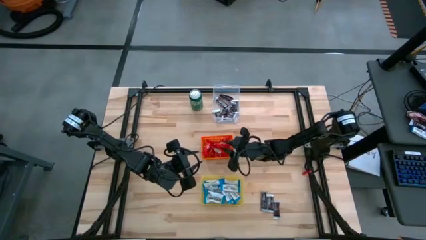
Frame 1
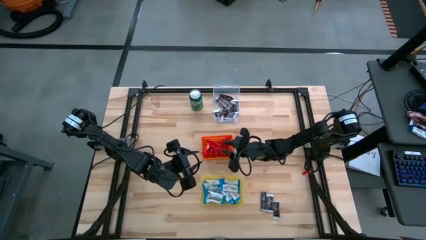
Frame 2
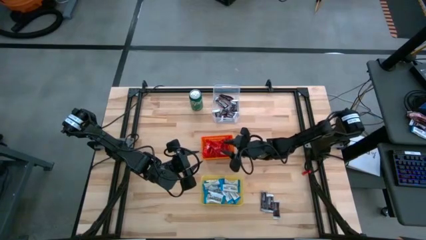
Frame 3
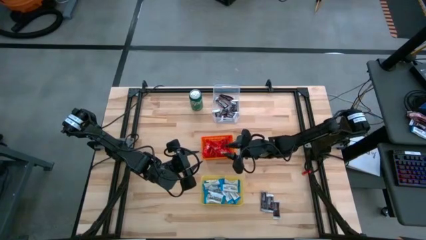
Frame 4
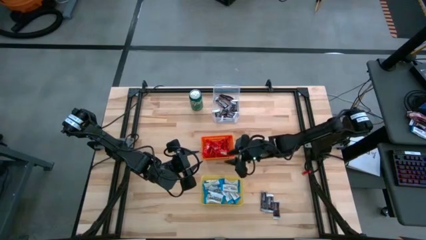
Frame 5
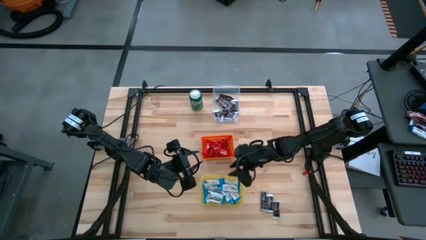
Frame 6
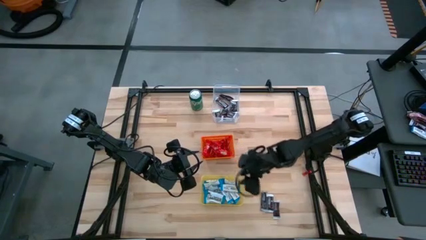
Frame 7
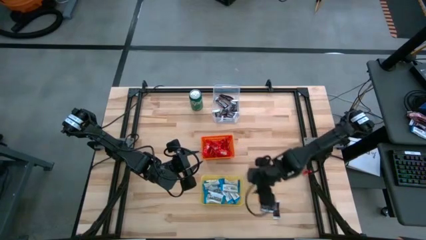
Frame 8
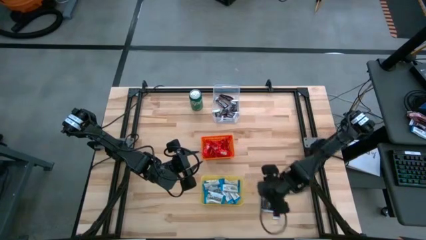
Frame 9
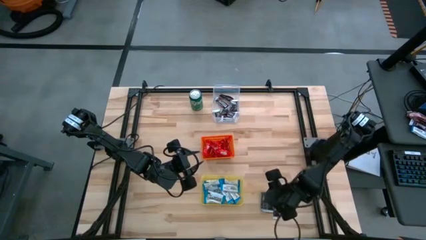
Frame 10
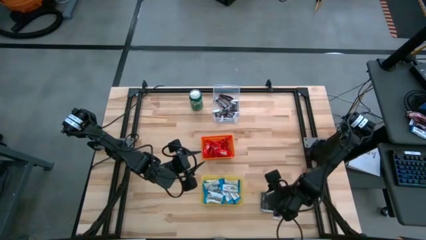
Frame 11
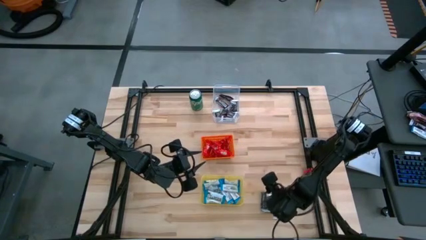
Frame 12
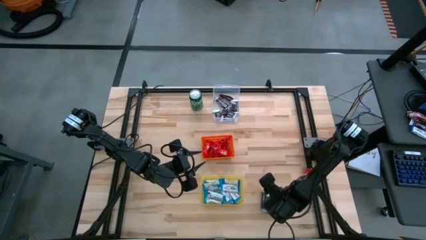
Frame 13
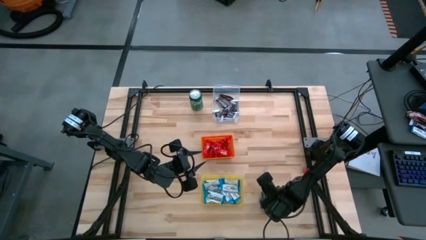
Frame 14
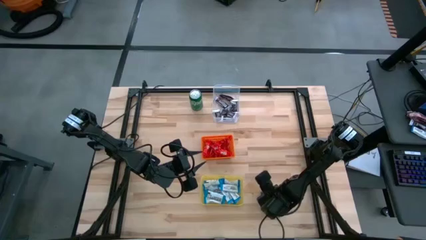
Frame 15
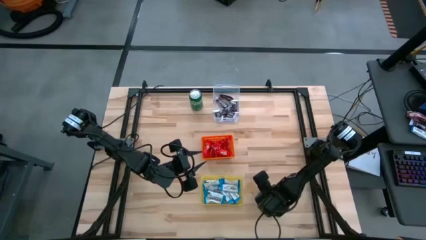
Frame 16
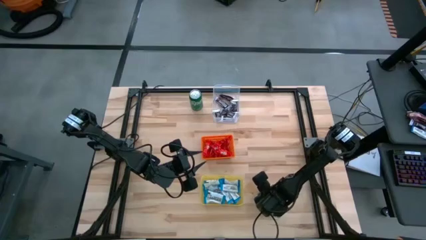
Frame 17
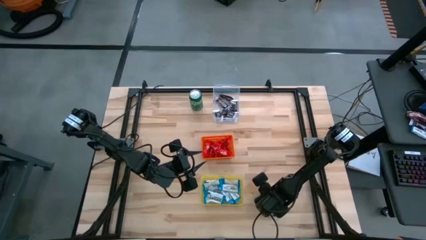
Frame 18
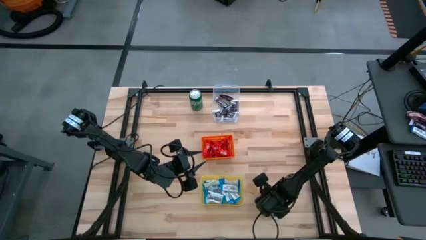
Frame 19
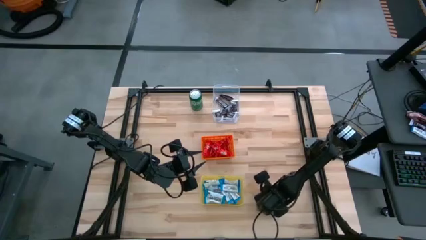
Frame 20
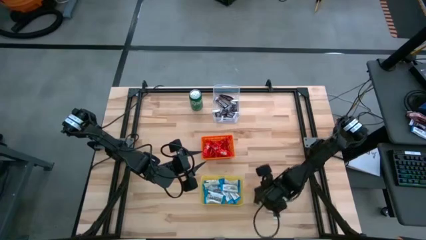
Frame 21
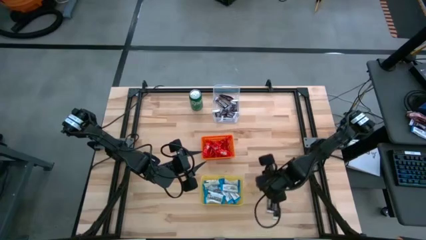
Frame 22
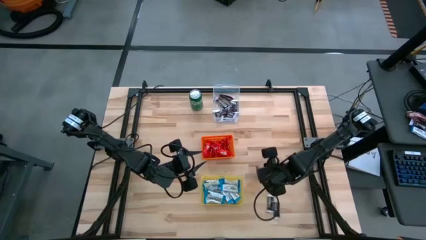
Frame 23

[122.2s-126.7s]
Task: Sort candy
Put the black candy into the transparent bin

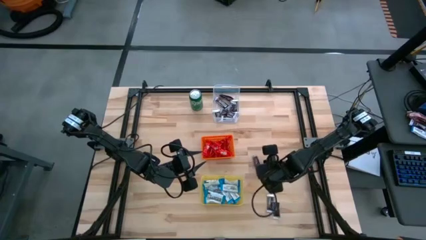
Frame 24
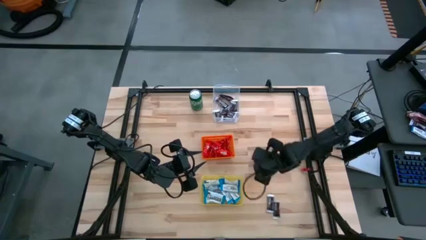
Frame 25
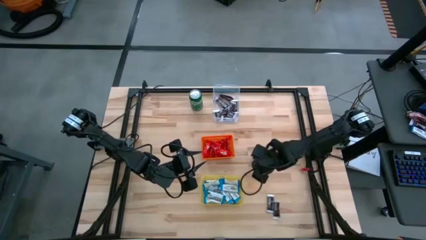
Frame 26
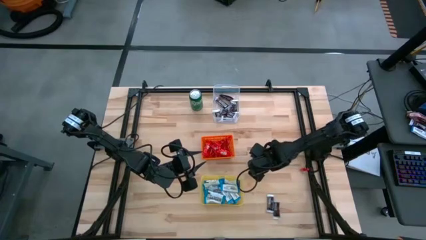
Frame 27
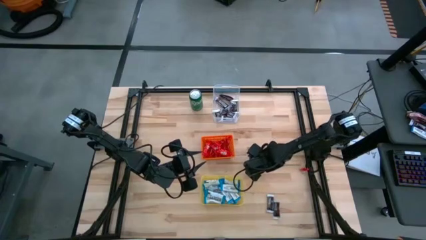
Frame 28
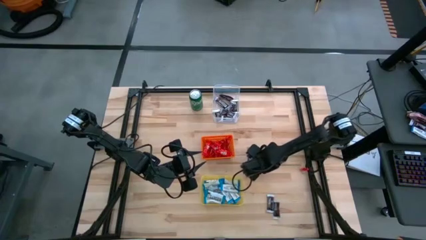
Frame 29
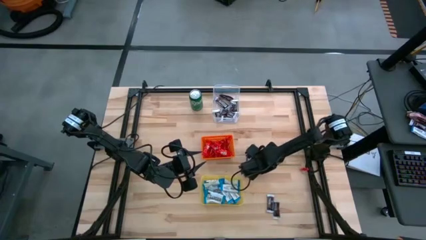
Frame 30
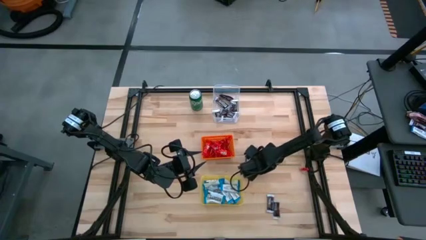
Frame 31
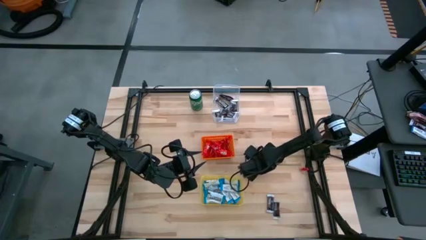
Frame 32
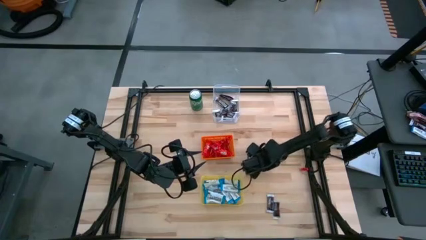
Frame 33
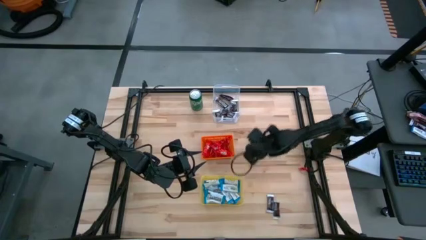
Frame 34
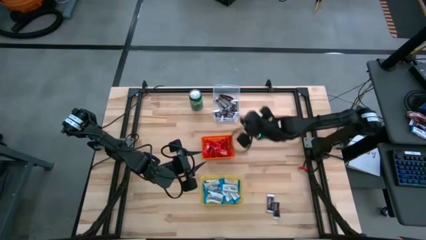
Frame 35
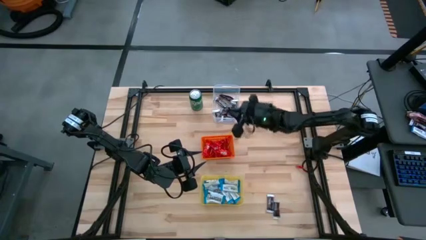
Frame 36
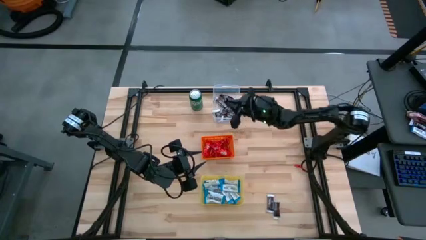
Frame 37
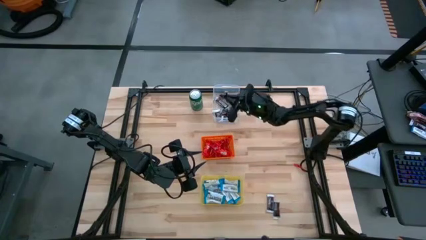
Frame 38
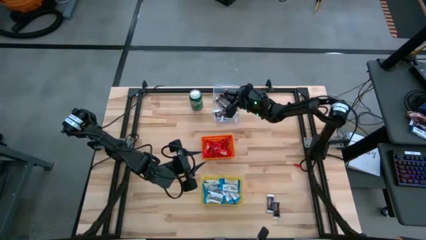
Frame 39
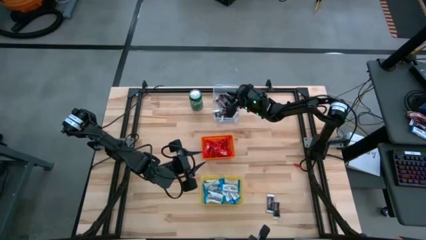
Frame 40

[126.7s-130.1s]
Put the black candy into the transparent bin

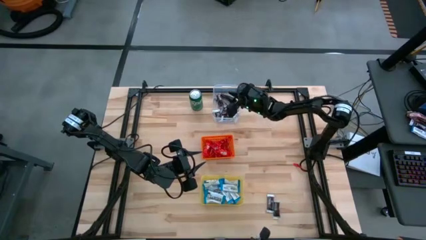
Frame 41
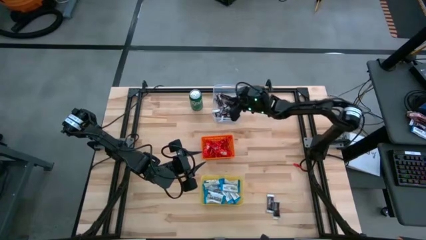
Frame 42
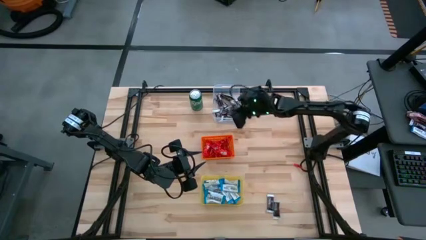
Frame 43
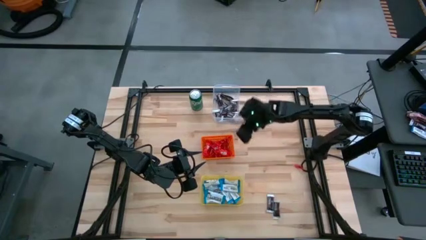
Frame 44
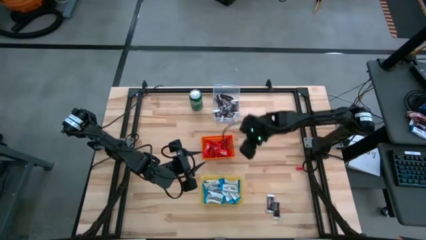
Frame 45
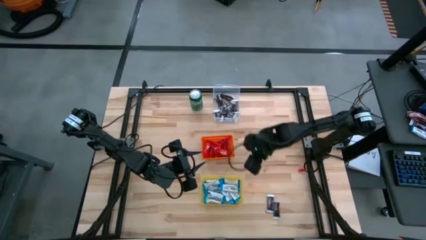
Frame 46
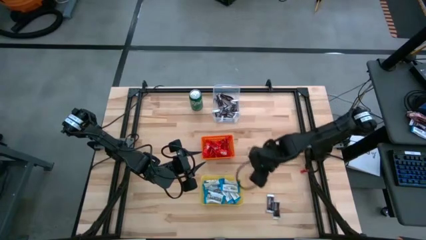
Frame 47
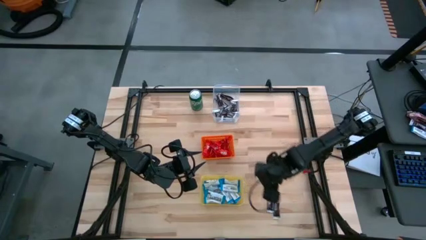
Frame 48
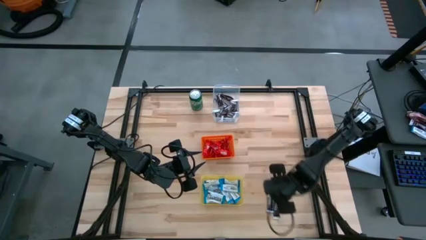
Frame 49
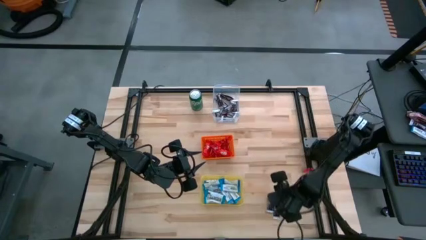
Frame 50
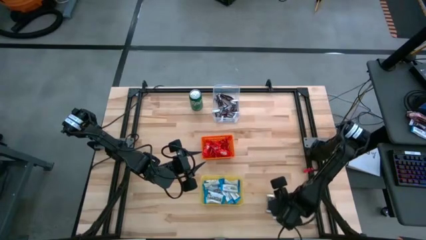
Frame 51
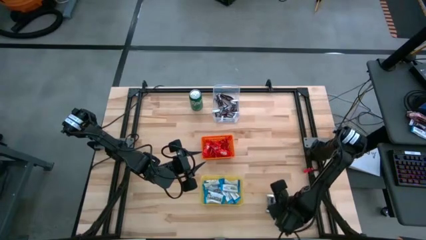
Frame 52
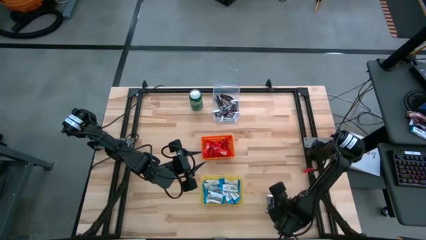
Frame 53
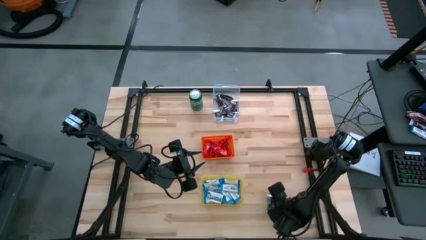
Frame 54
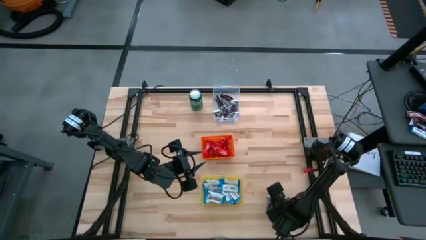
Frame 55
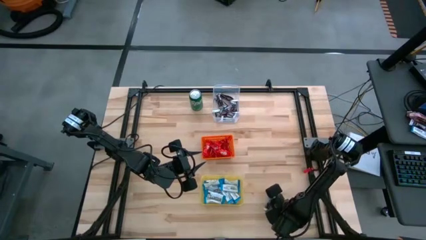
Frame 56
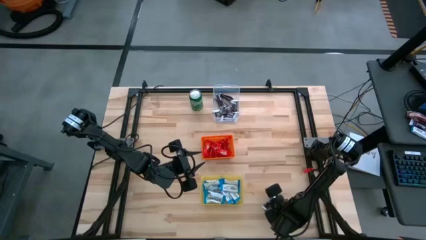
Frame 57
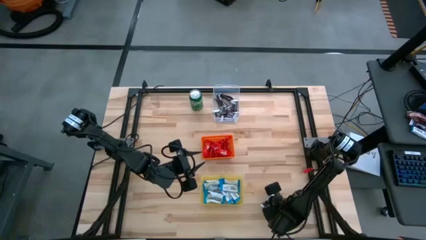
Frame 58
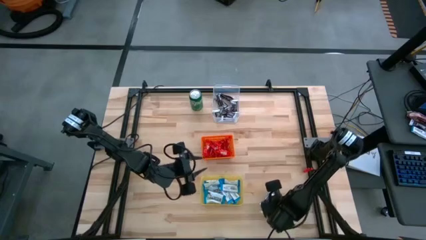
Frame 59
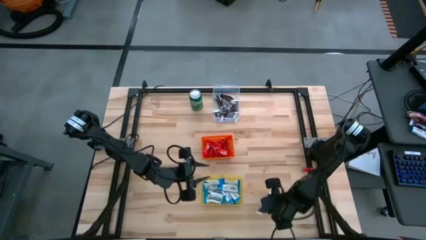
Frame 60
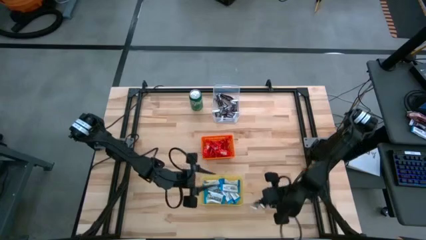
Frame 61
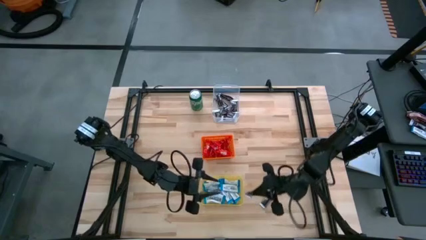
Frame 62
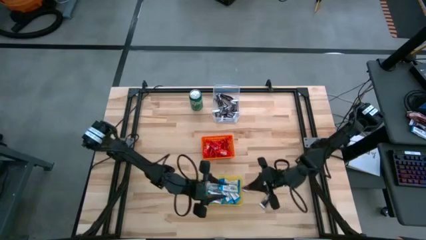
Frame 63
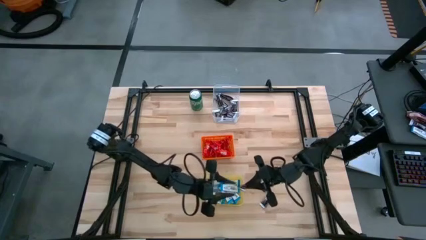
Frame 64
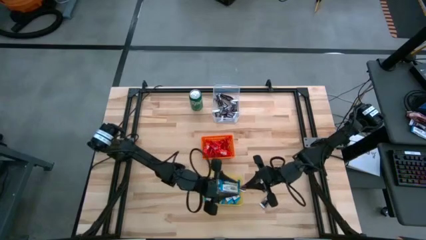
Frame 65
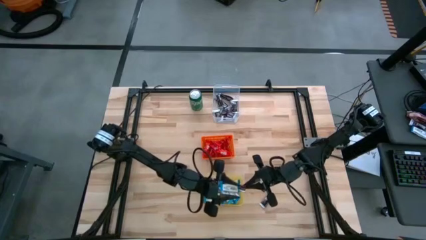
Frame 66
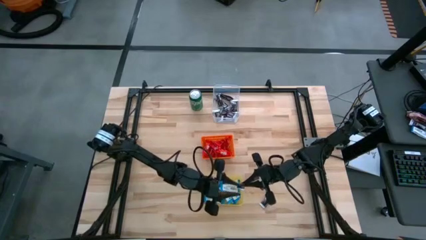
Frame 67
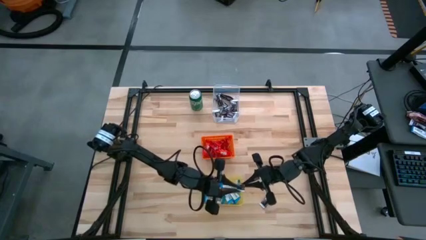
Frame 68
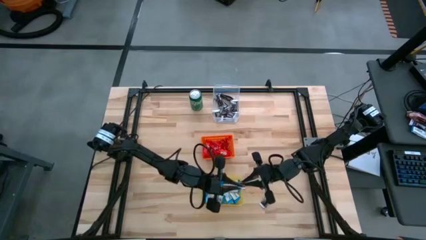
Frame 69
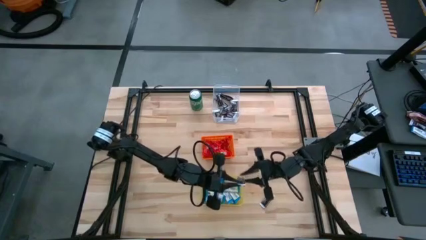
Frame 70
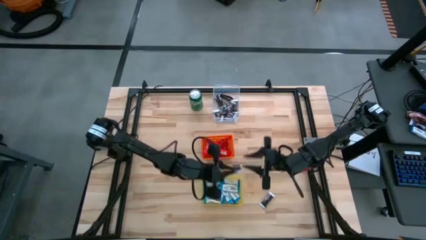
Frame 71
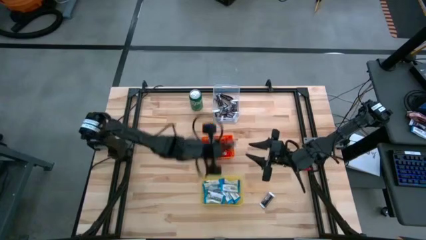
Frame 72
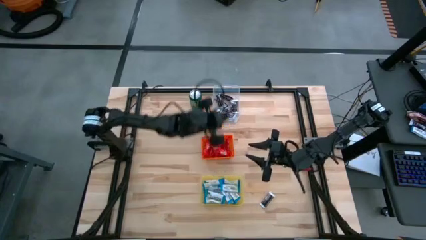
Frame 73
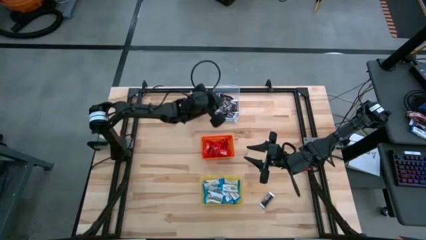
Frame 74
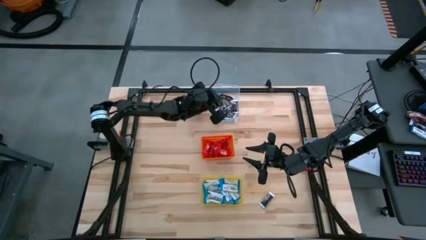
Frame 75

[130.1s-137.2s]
Put the black candy into the transparent bin

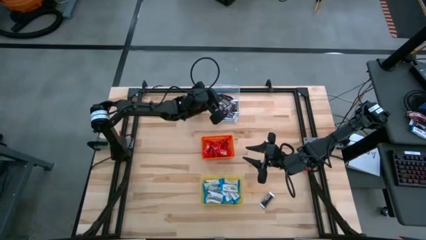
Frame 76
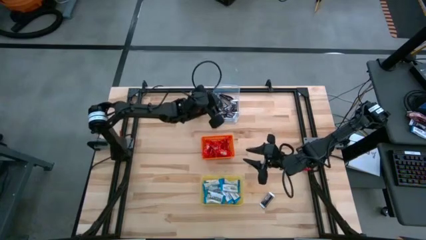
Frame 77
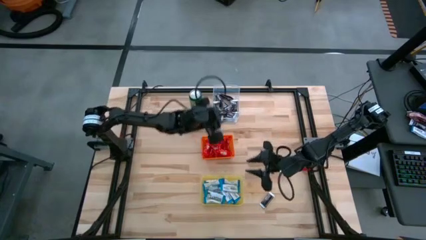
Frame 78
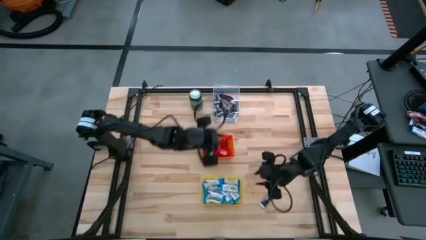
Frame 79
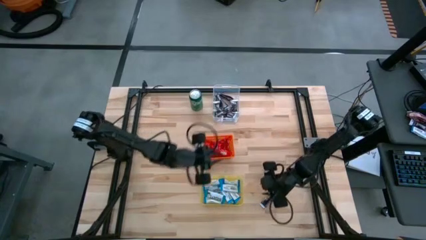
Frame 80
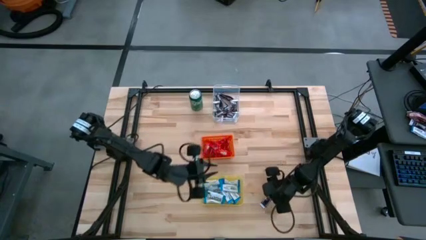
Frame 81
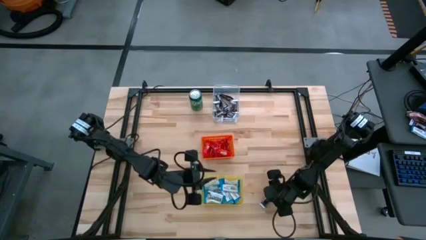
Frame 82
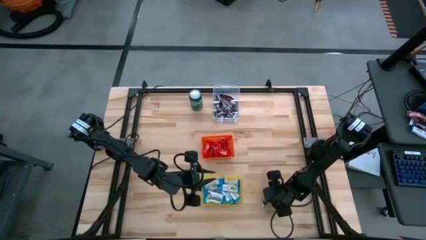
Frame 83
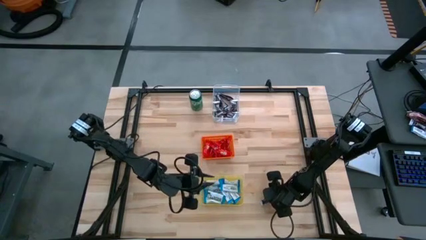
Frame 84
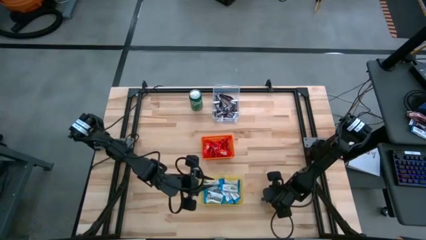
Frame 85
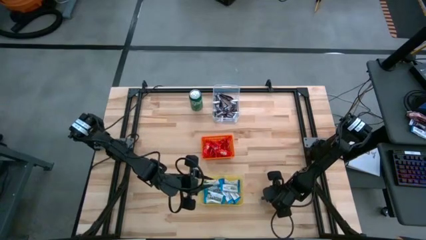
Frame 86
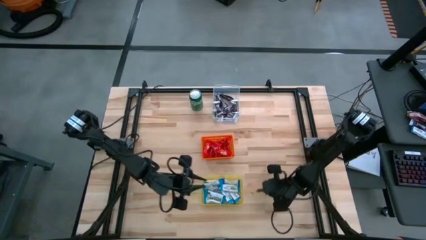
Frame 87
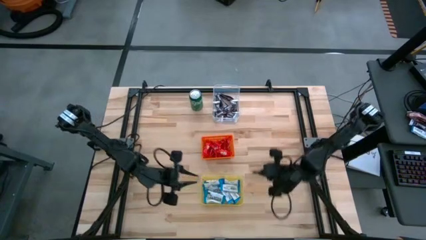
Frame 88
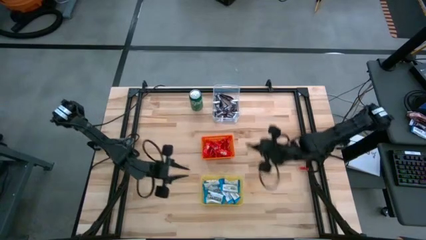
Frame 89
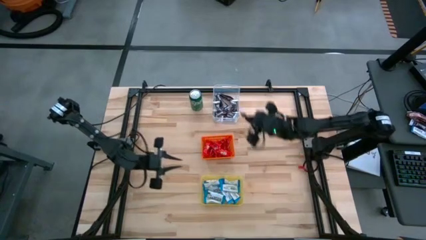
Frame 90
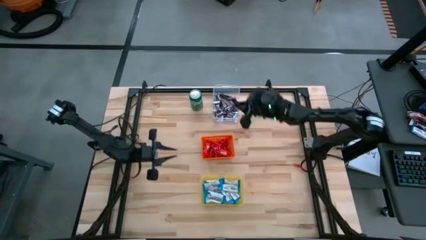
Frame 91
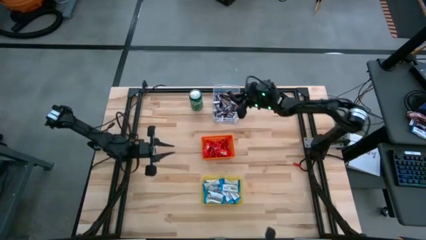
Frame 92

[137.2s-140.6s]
Put the black candy into the transparent bin
